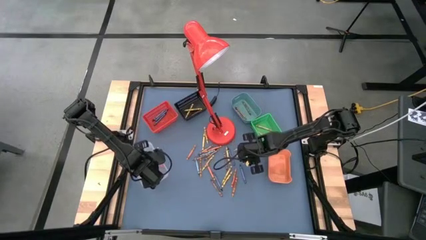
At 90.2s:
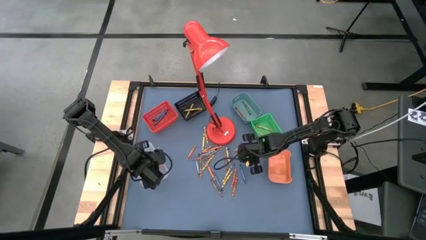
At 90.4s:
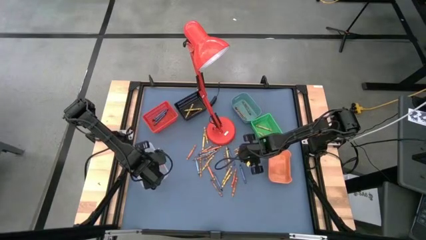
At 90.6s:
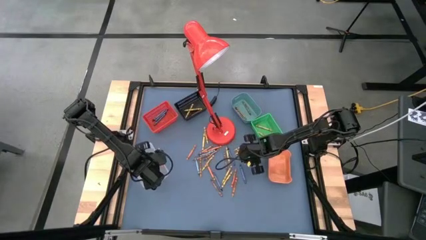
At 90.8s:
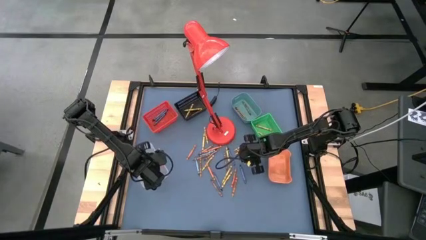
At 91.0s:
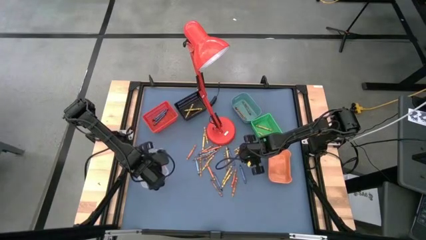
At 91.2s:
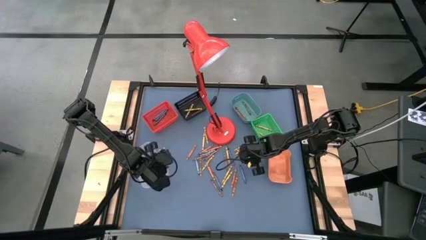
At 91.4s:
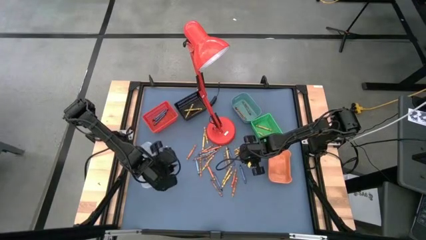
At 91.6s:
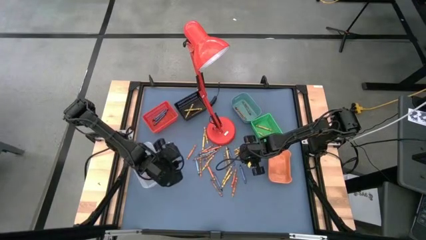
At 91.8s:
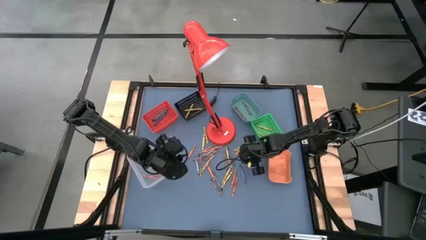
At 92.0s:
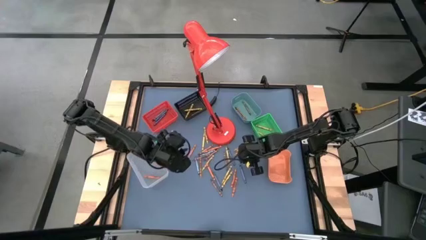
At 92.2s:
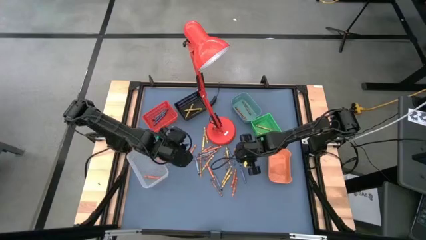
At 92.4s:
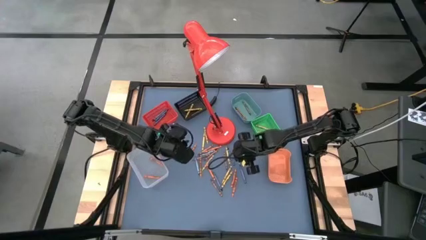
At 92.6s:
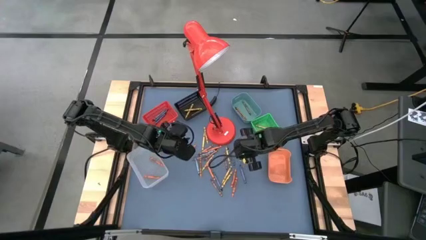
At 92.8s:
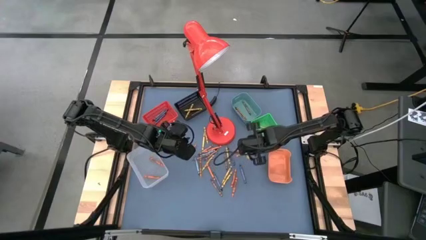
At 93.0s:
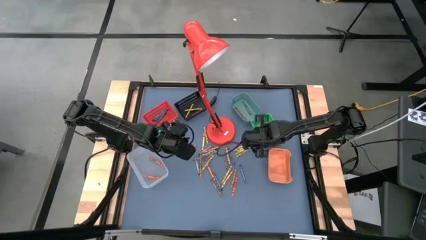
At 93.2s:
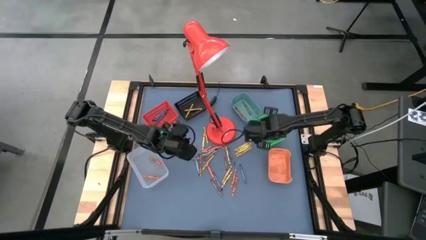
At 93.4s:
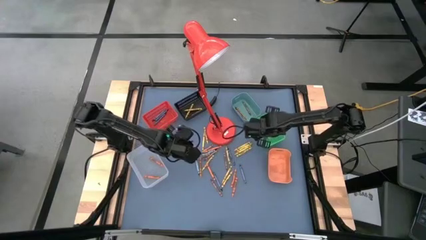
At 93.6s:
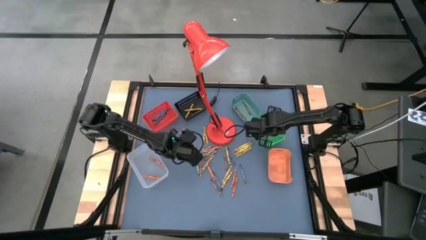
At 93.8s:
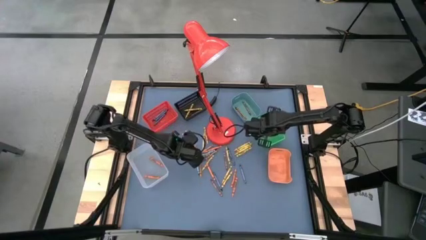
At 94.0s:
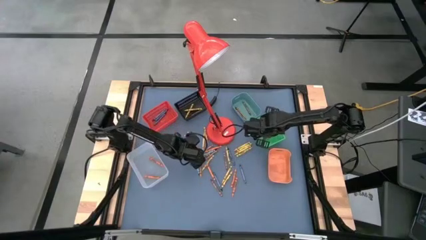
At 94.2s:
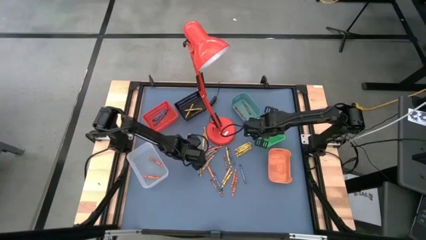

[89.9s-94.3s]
Task: Sort crayons
Put the yellow crayon into the middle right green bin

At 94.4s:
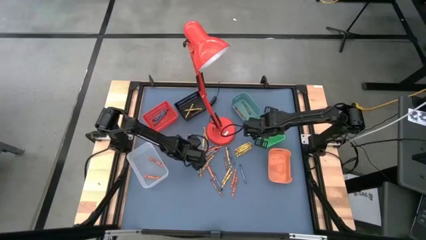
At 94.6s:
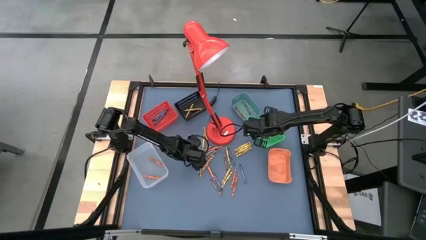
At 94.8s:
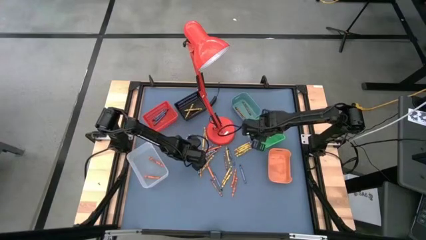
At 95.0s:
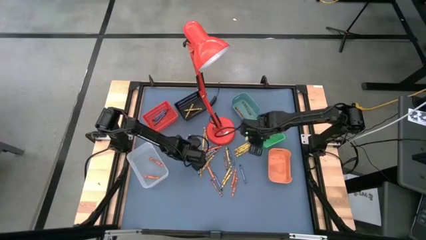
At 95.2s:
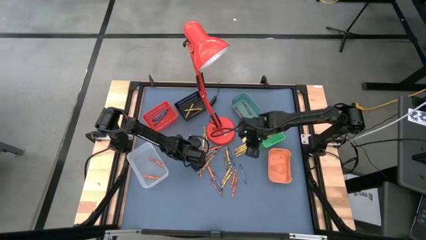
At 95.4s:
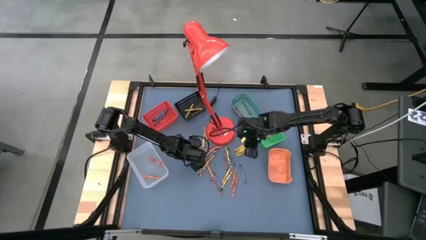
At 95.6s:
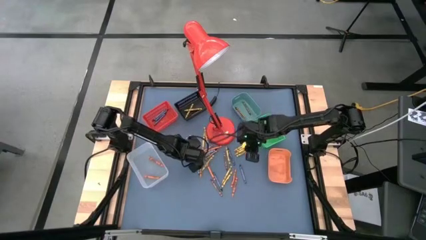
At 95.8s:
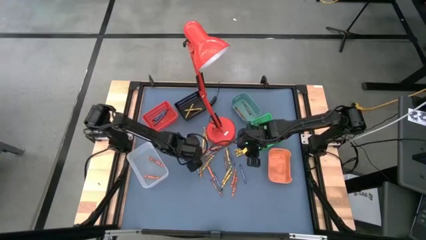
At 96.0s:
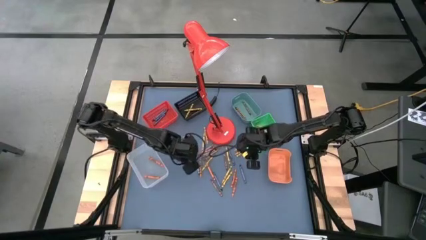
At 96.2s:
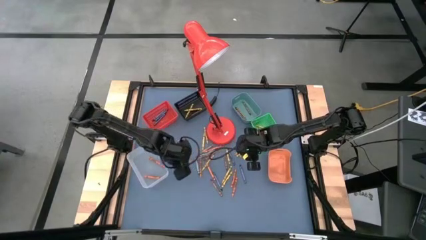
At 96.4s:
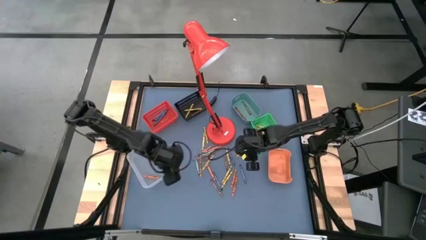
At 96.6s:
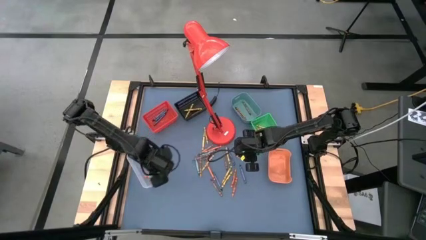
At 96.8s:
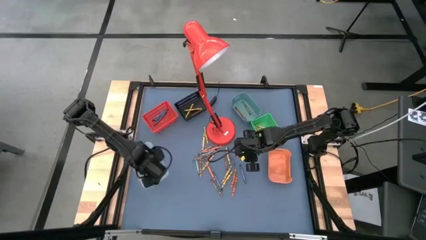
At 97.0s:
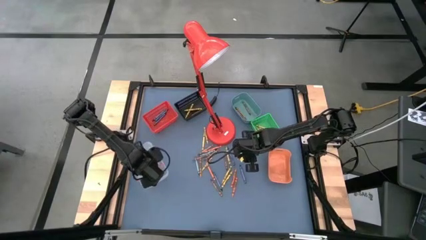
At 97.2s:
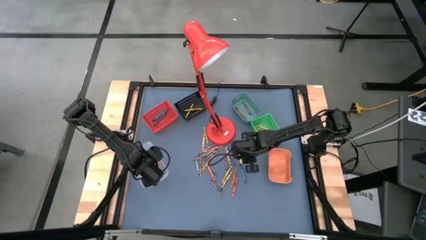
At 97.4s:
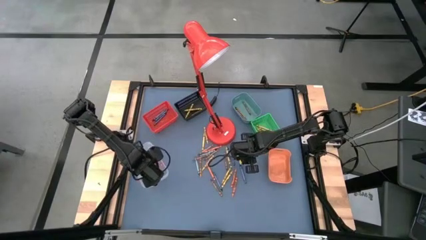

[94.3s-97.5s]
Put the orange crayon into the bottom left transparent bin

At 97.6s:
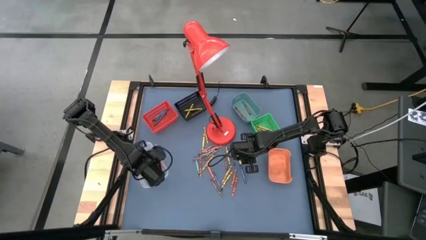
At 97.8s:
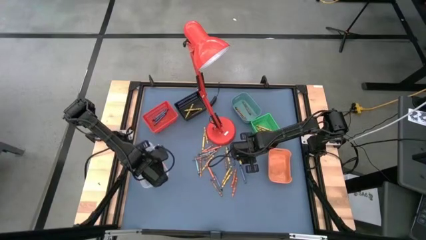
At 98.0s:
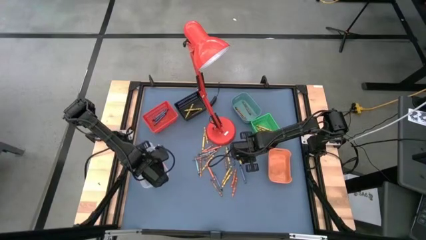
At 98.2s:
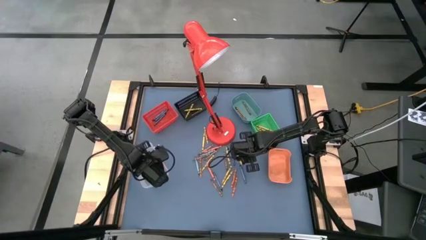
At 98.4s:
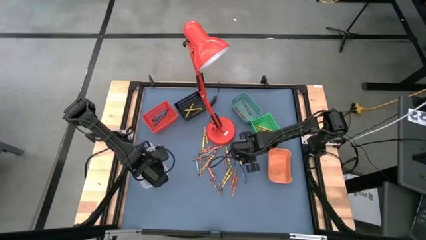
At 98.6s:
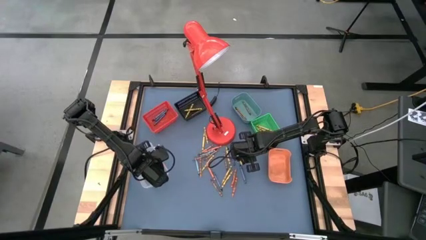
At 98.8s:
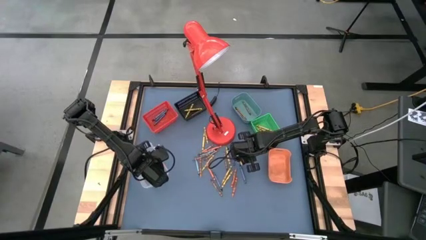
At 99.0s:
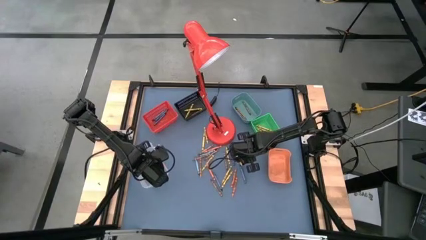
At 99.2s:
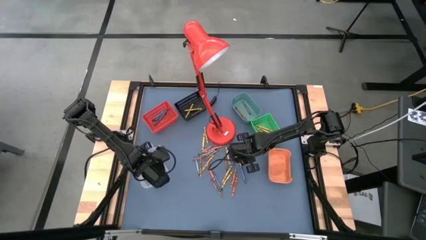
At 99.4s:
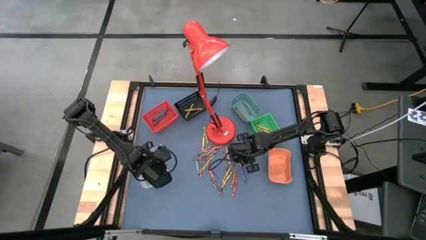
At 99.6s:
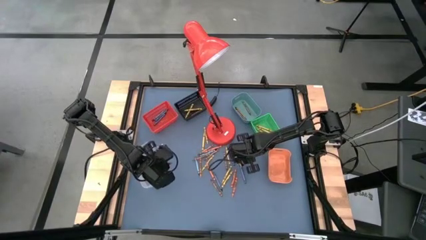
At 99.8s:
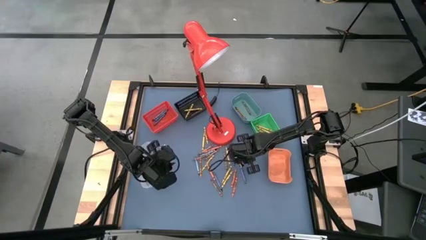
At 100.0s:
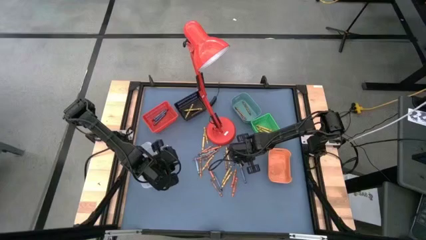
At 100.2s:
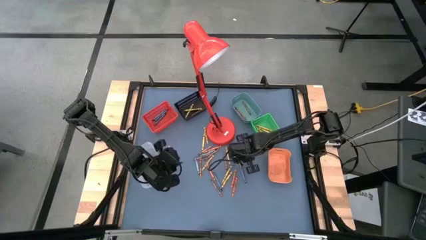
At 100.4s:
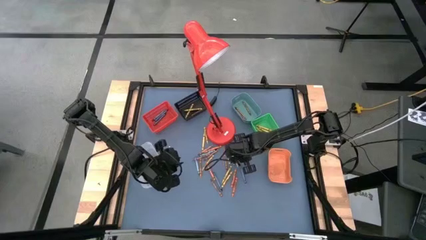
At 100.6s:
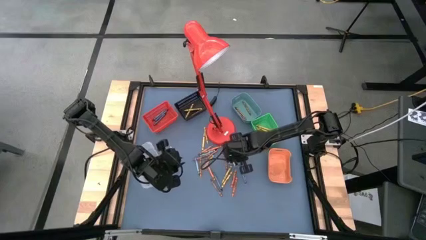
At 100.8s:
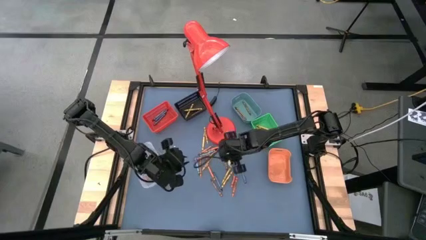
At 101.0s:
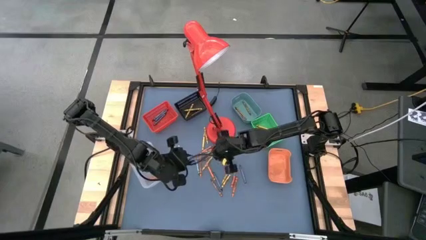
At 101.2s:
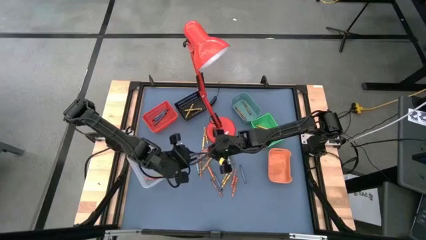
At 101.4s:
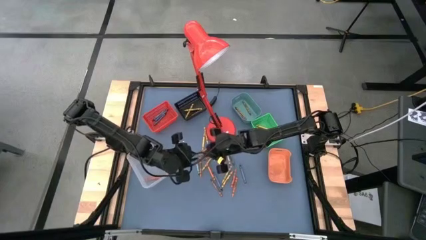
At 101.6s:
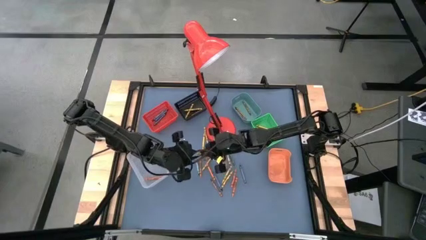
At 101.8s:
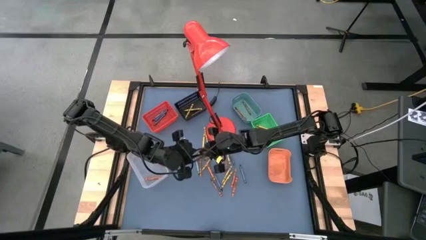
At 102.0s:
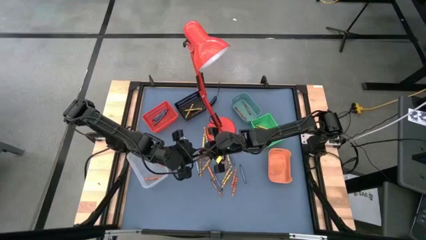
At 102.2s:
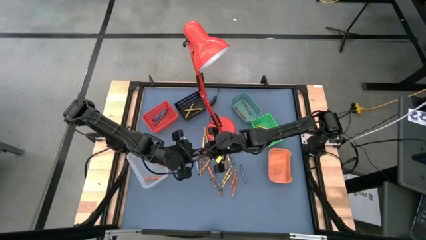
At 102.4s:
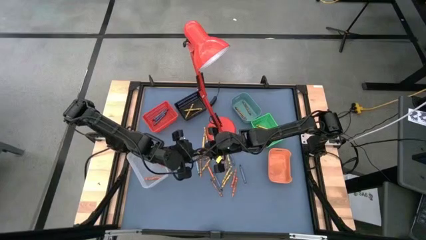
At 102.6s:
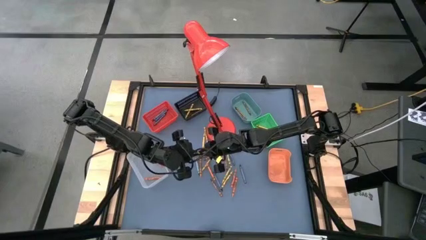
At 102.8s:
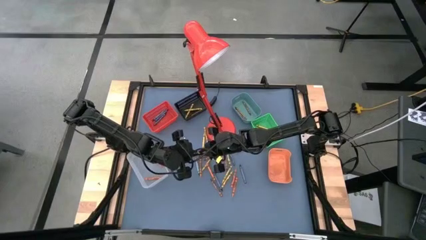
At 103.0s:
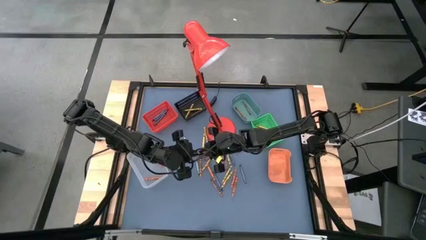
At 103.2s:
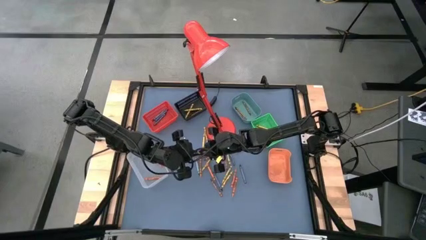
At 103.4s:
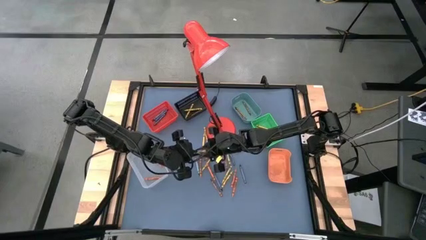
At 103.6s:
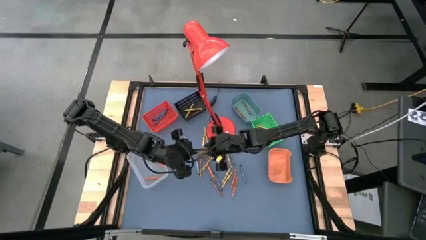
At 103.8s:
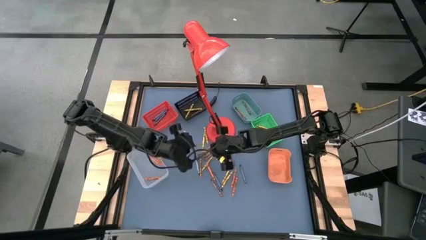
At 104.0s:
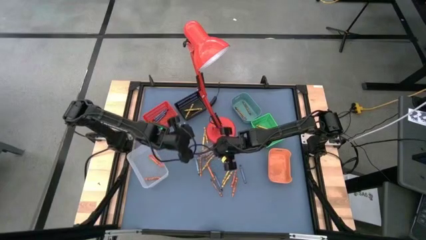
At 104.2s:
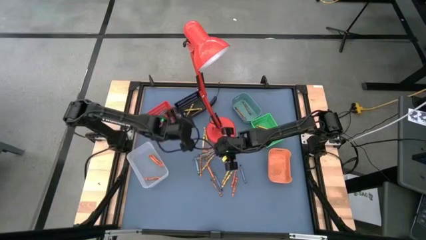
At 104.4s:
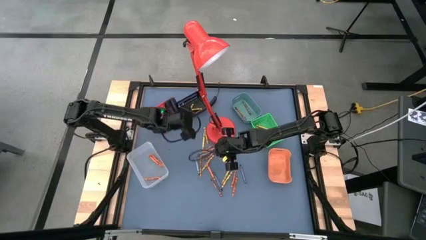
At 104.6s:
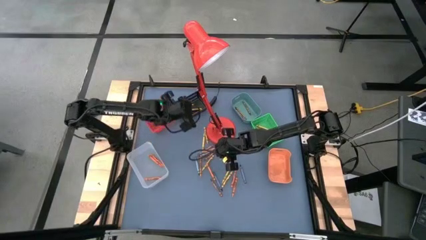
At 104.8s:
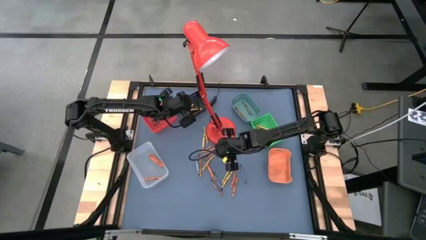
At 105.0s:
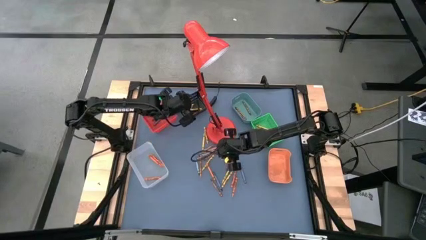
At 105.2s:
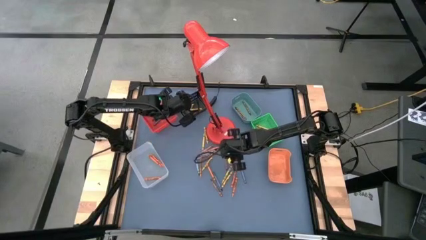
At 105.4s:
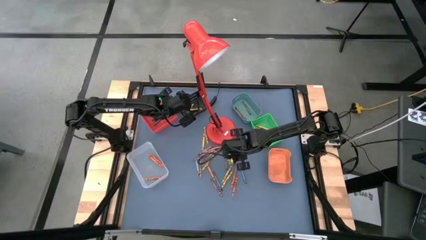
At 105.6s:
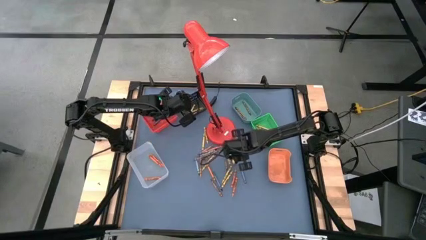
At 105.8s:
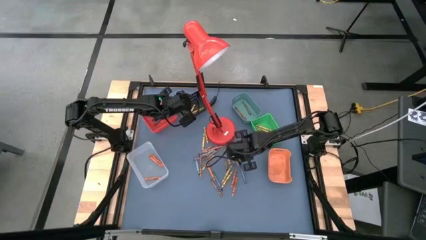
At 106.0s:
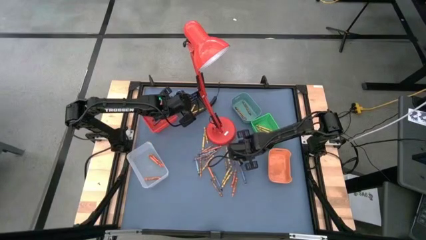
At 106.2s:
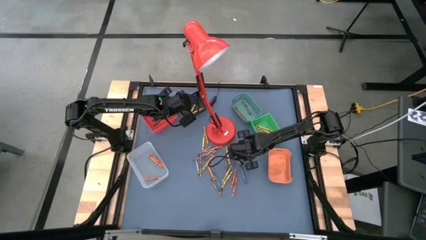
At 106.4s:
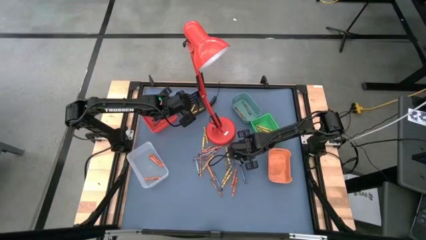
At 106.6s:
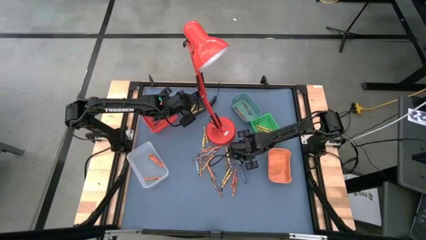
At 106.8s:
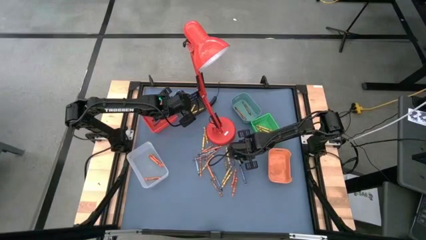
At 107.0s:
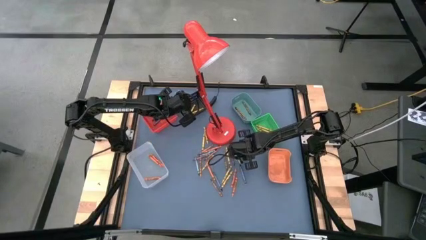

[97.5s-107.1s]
Put the yellow crayon into the top left black bin
